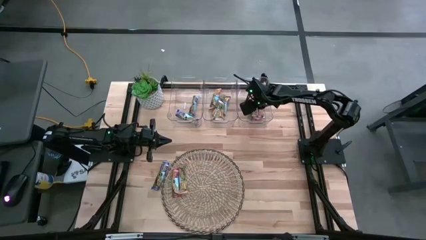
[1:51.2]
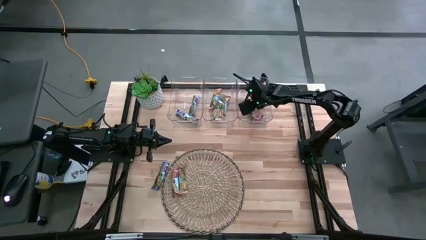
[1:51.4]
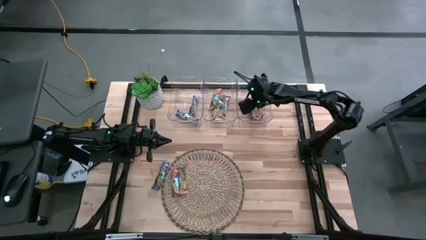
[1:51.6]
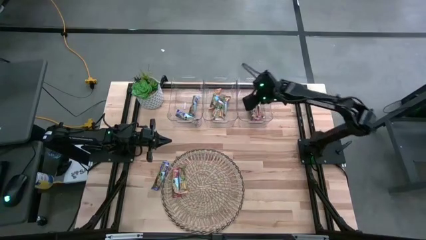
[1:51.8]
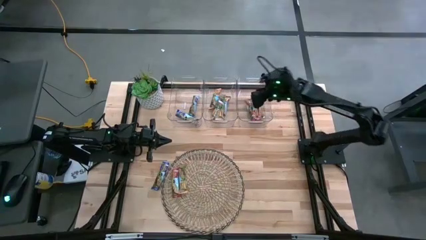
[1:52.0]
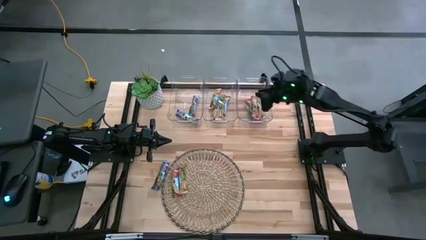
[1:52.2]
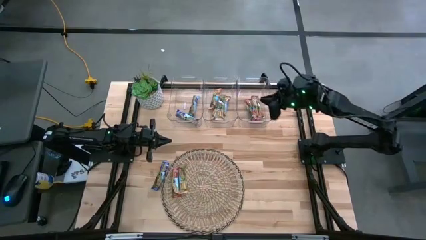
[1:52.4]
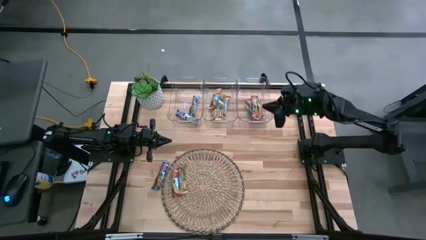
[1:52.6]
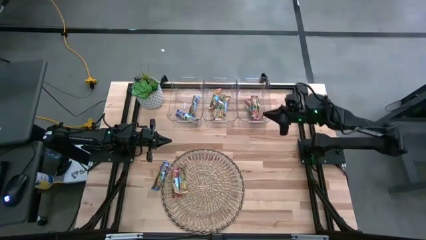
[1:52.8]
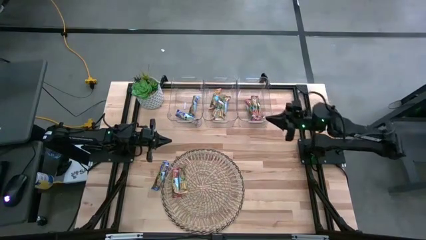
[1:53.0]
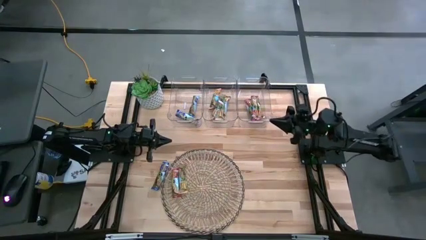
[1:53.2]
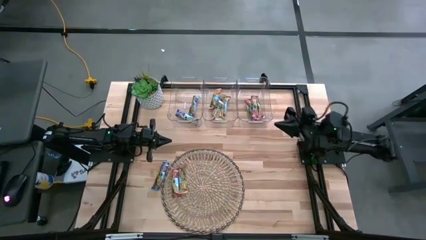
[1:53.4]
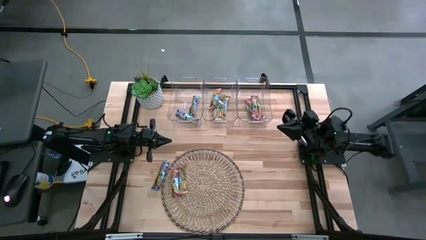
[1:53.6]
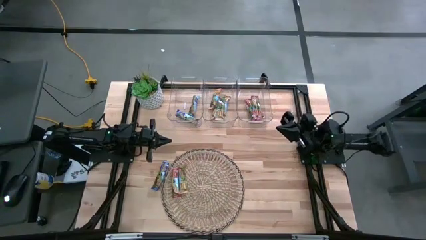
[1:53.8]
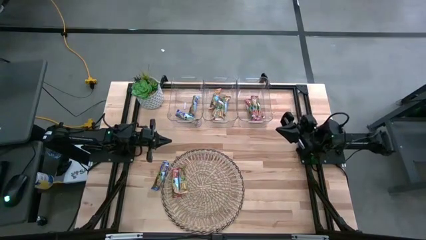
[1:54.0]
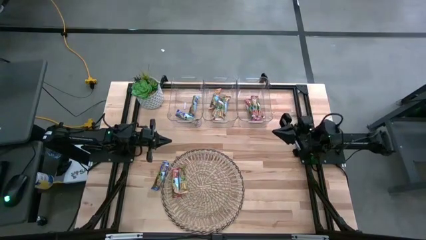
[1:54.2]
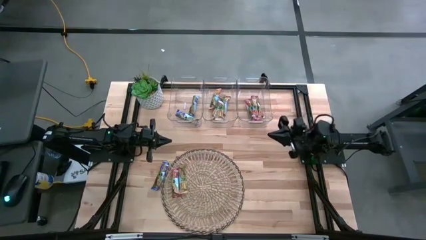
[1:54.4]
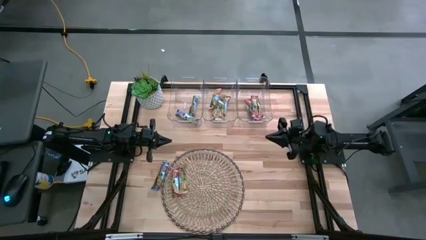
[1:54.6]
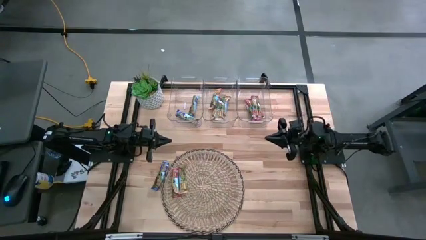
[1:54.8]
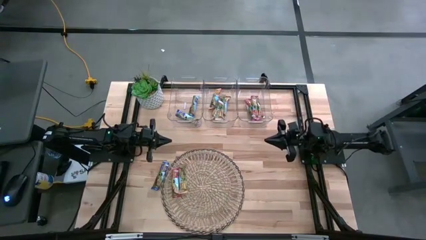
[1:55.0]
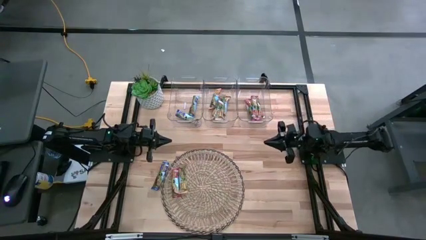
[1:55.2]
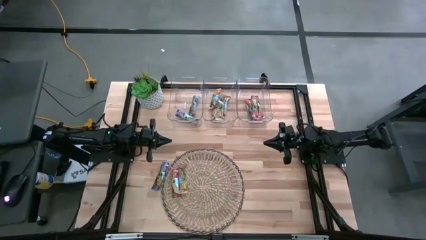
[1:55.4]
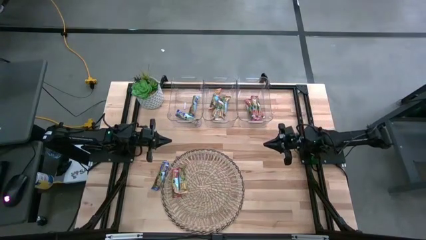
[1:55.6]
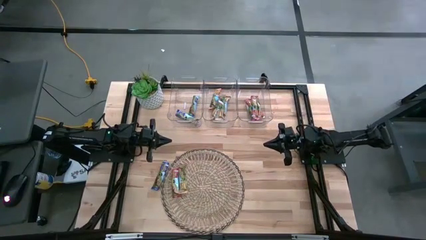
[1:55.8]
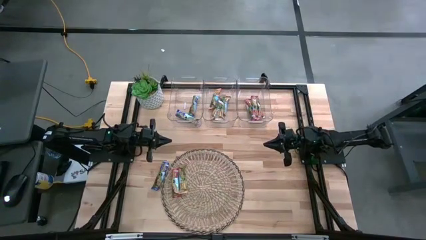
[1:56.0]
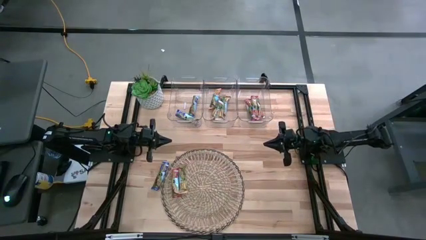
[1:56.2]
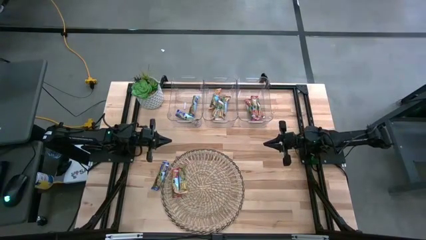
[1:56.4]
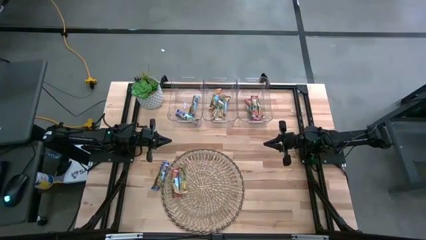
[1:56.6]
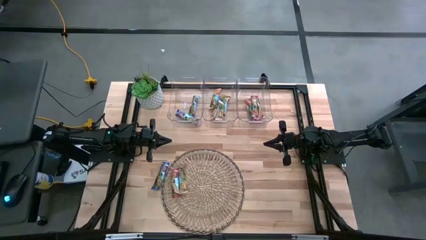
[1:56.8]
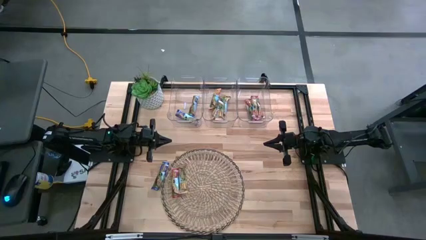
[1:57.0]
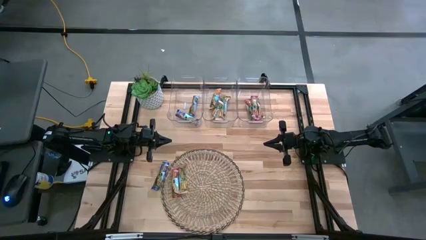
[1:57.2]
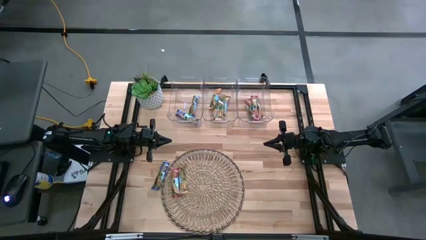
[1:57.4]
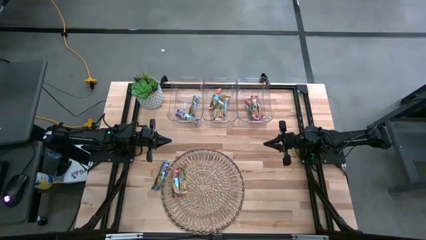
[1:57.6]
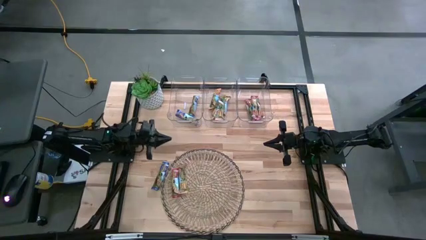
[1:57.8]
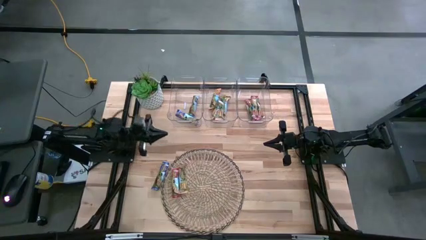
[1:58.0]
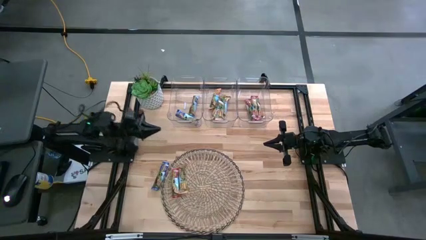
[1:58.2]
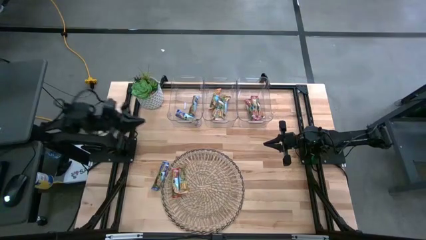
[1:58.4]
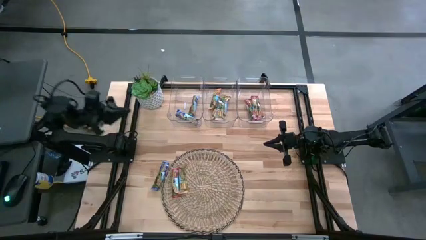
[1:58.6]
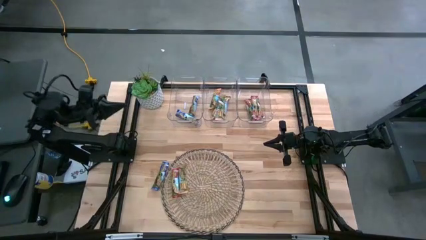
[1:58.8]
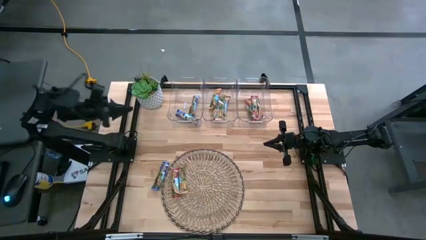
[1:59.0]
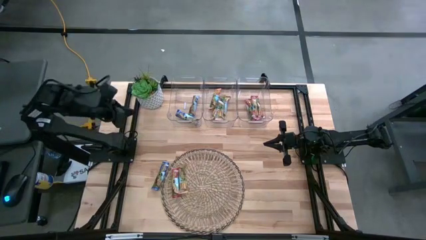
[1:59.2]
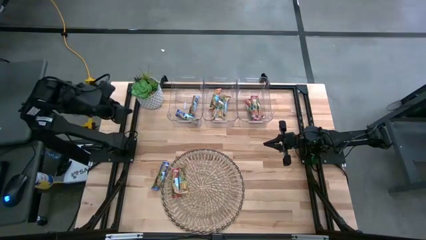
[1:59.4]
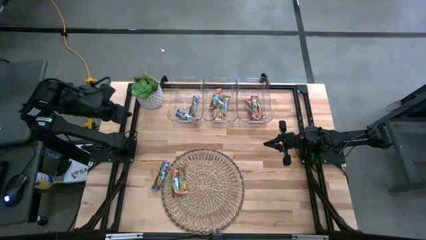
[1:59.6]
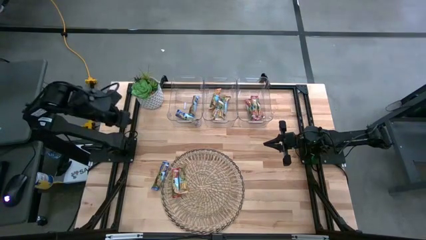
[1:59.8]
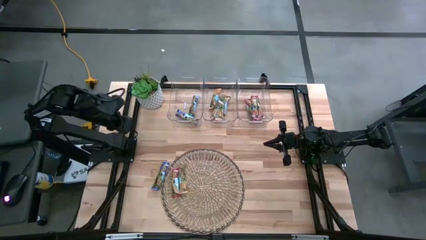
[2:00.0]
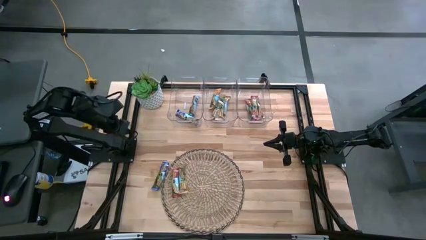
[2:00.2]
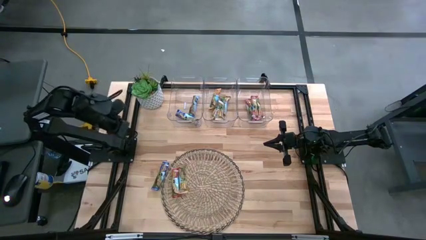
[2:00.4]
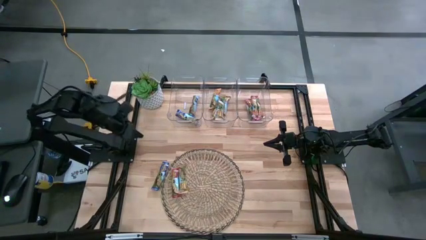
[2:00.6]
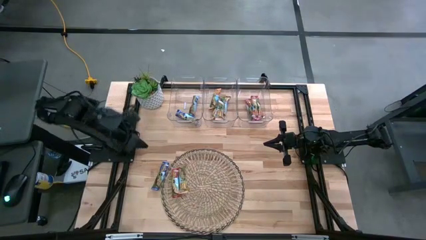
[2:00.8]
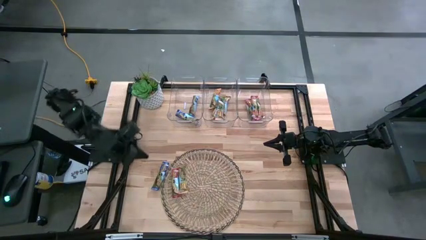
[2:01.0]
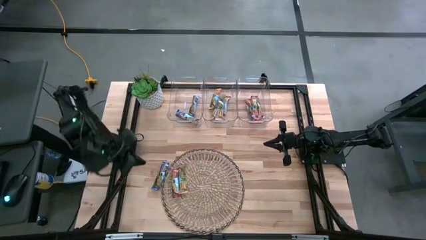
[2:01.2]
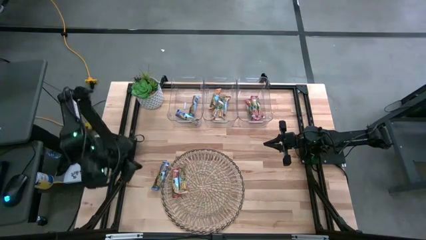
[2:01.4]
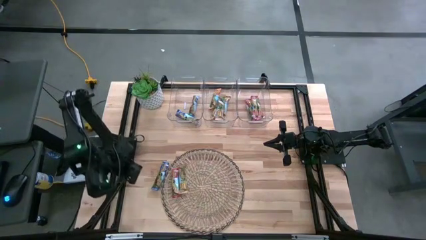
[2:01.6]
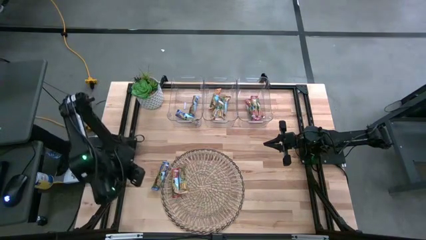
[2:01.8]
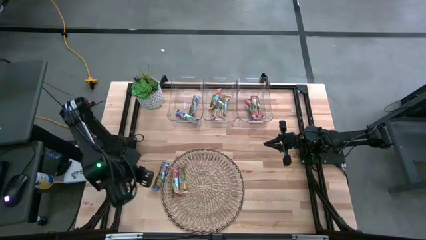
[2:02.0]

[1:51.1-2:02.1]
Task: Pick and place Granola Bars by type
Put the blue granola bar into the left transparent bin

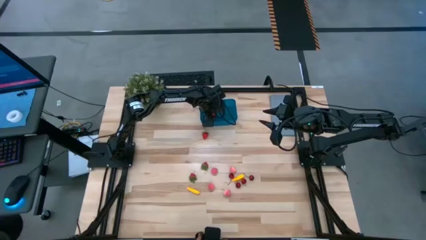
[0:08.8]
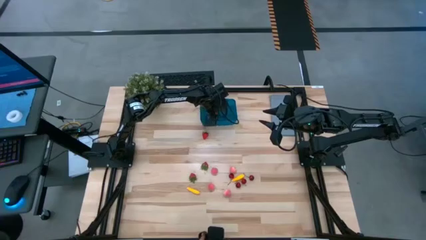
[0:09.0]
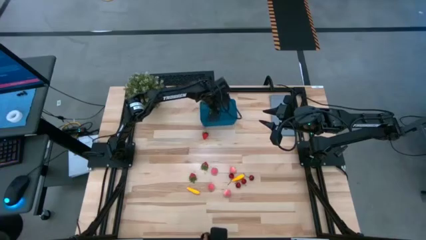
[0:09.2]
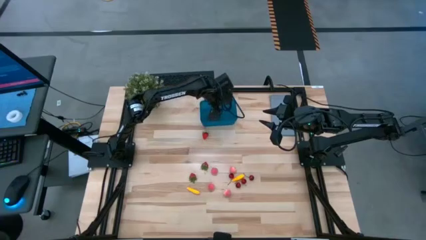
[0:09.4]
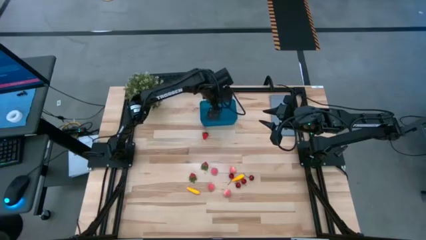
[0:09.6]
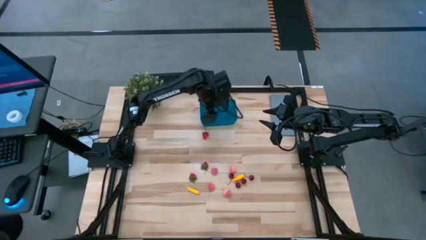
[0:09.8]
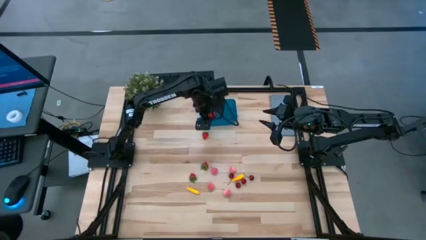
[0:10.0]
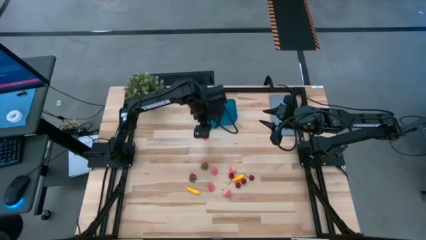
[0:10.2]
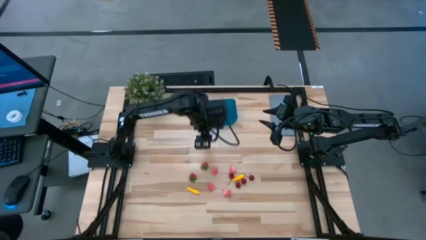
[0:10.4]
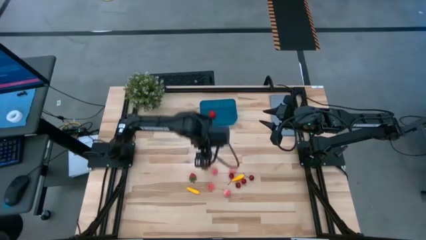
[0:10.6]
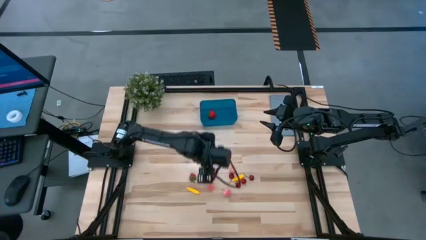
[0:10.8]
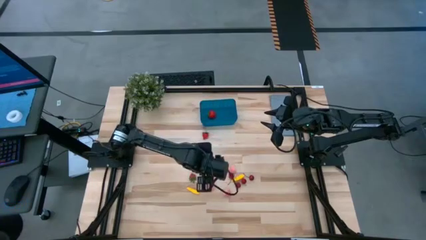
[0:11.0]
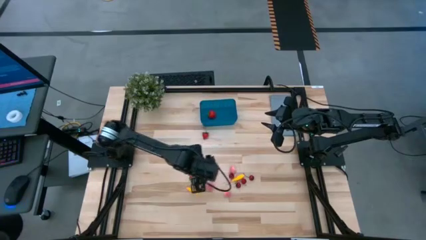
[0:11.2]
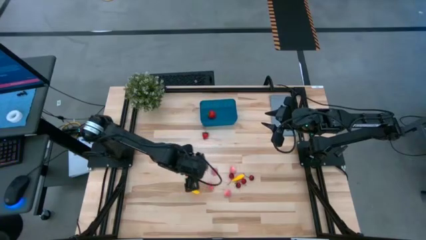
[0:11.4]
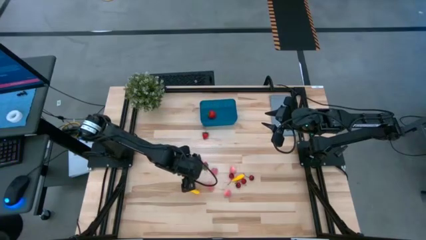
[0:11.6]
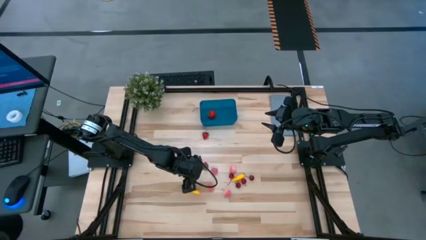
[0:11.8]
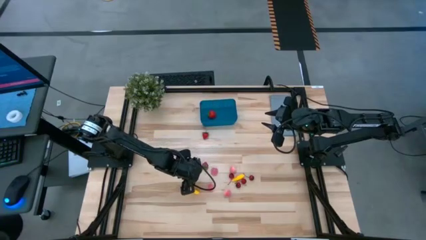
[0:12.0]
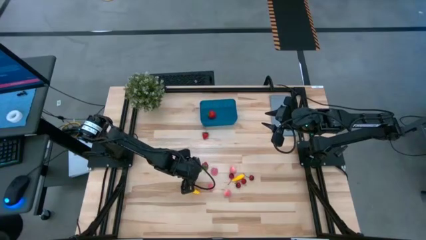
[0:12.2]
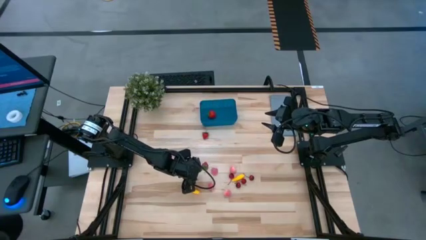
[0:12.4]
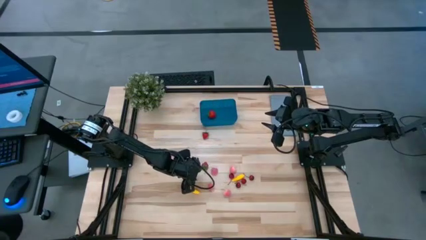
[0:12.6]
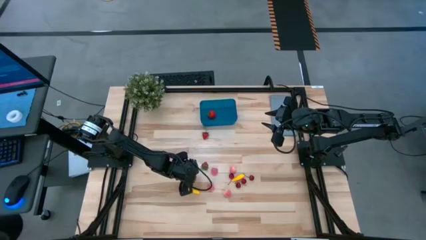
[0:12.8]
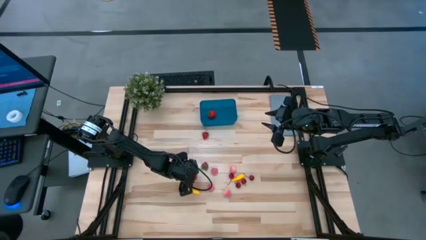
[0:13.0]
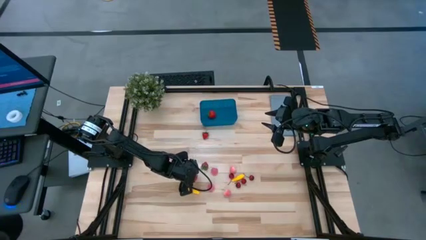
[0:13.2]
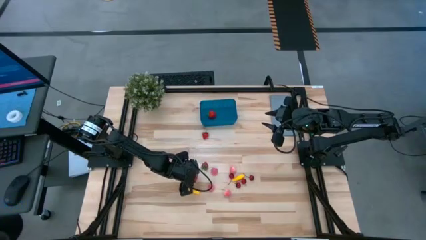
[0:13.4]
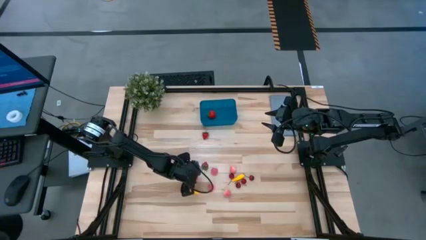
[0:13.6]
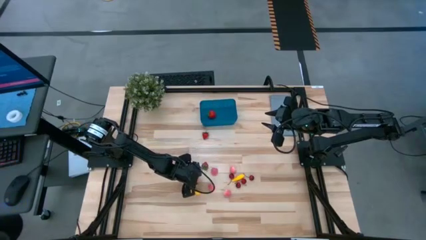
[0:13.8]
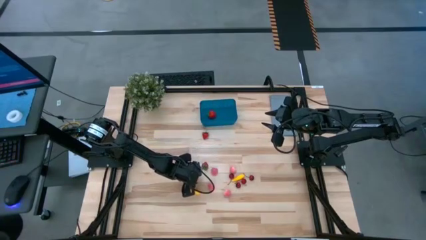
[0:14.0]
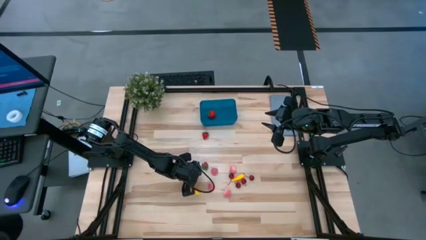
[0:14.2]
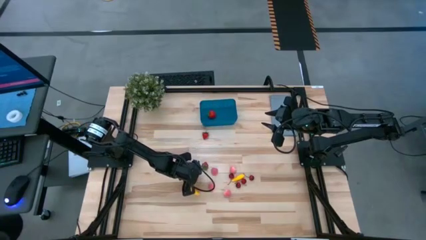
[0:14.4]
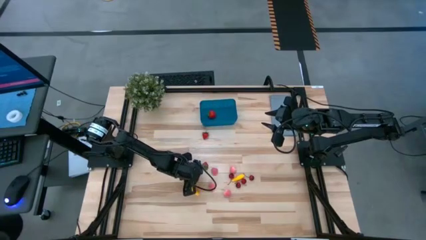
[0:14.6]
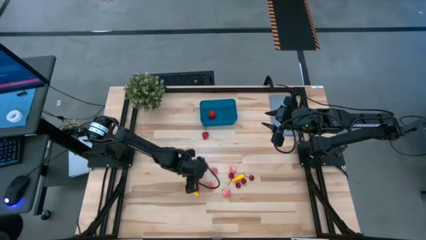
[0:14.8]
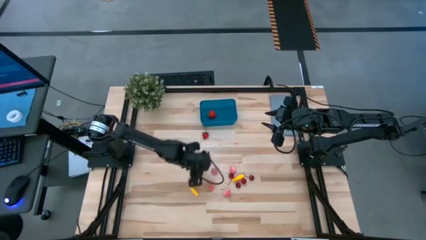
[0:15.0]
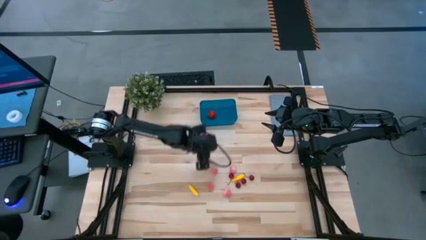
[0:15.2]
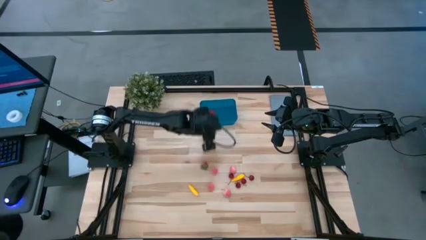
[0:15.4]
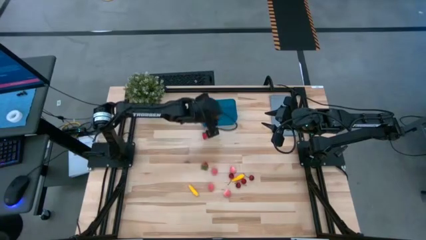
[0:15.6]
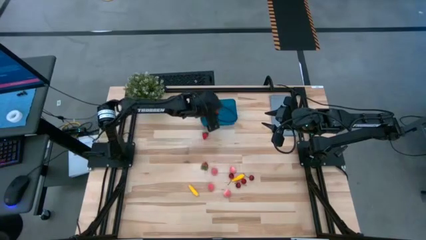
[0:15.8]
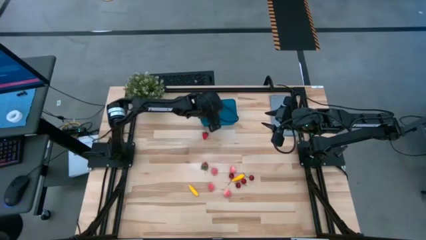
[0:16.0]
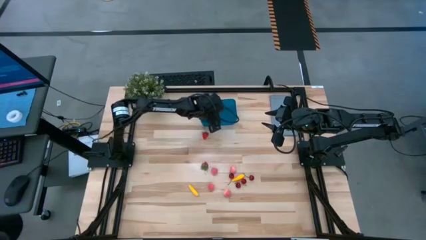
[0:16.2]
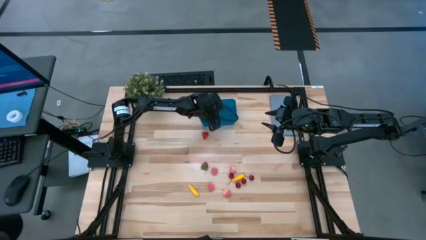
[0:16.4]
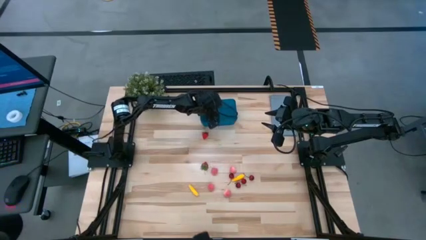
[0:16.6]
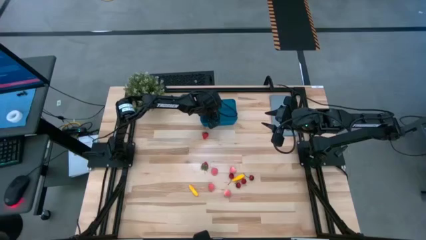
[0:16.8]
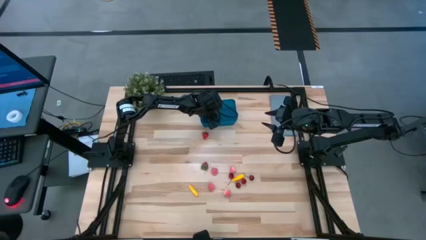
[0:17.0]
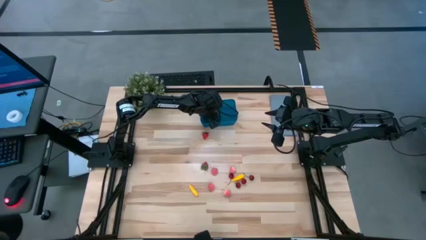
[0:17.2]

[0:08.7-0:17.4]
Task: Pick and placing Produce into tupperware
Put the strawberry into the blue bin
